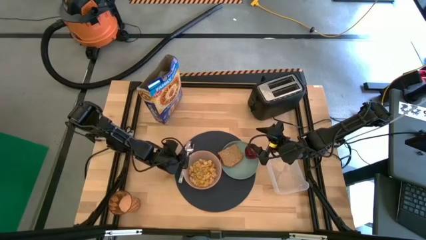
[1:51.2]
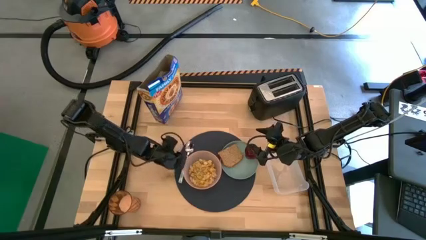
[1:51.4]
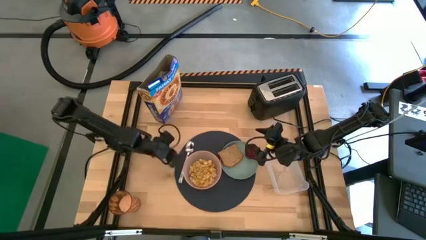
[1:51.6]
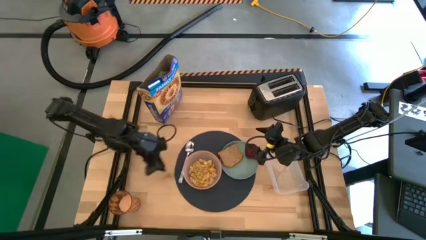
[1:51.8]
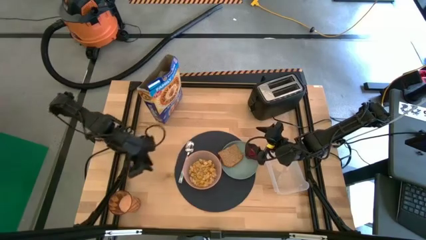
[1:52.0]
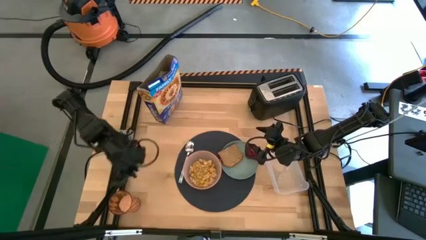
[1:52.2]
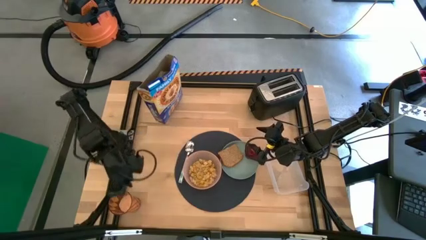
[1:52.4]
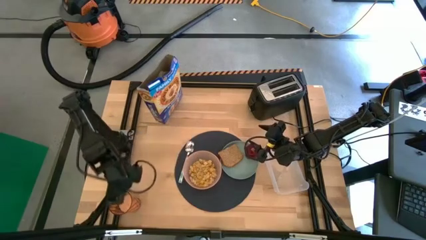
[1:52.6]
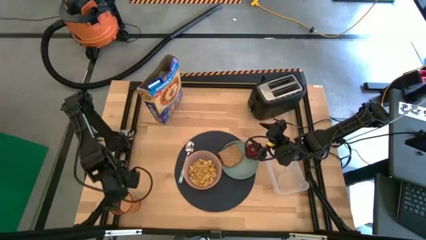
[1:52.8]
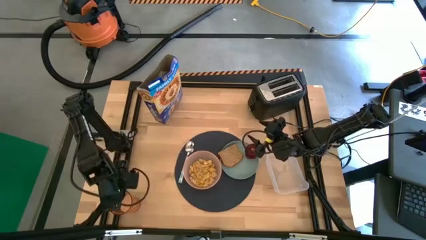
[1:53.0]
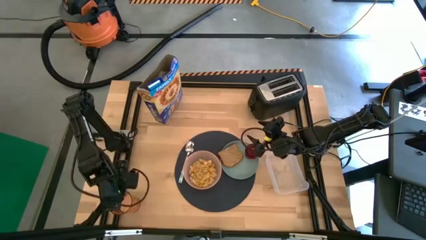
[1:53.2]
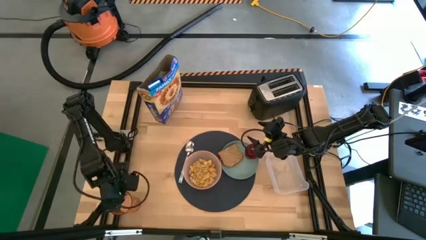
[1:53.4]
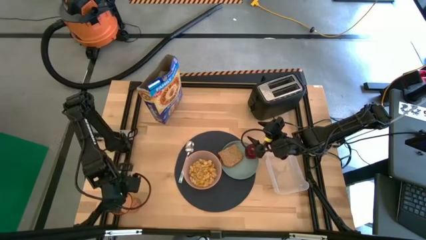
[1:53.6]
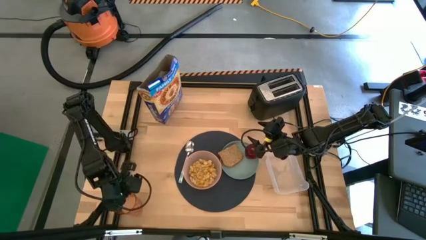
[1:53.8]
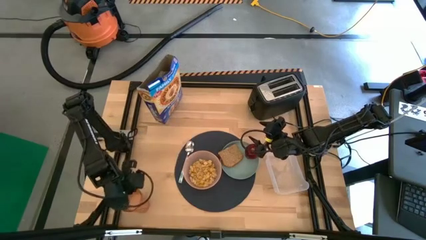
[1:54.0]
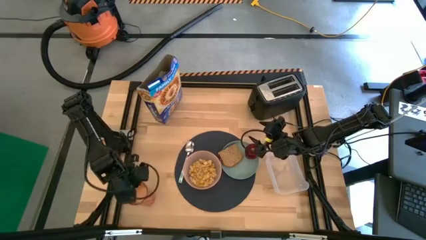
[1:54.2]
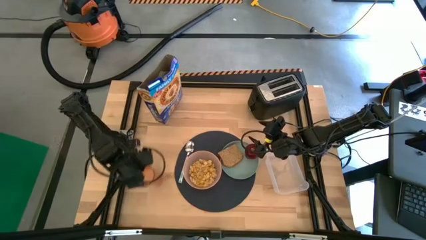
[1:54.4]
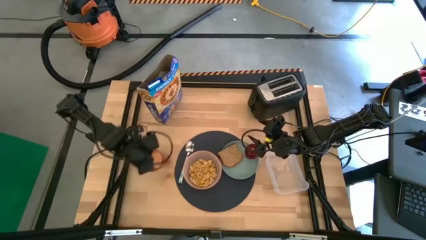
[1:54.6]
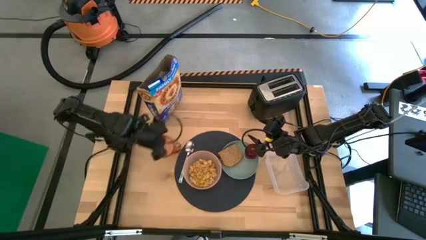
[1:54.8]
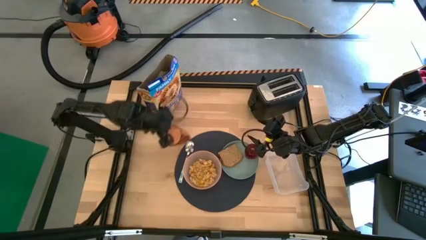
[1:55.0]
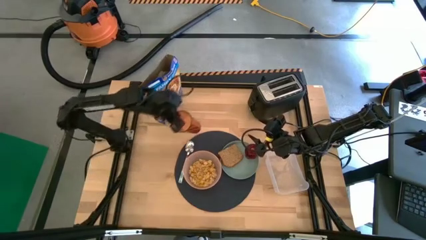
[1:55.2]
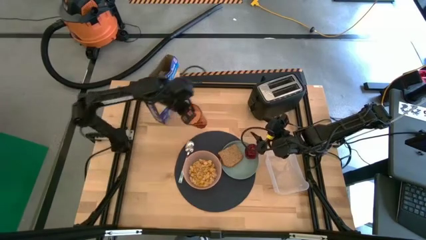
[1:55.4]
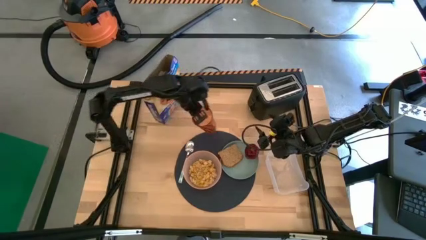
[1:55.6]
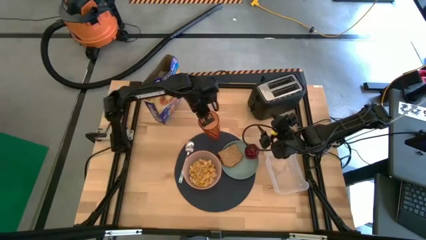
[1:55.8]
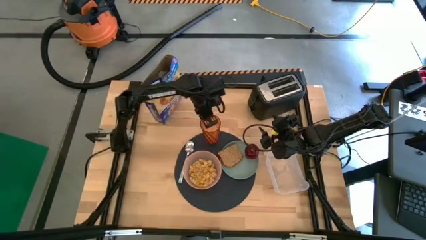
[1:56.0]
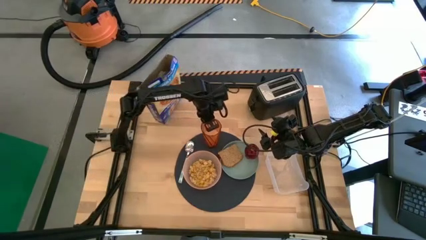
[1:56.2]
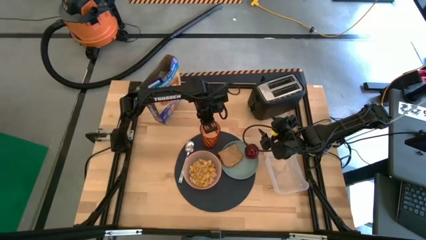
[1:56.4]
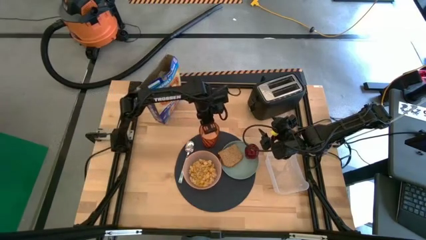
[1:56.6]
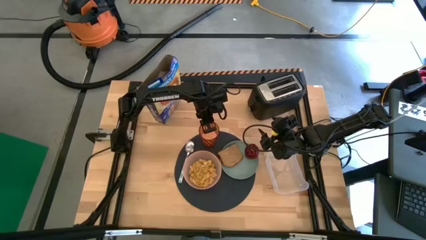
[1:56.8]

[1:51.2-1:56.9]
Task: Arrange a breakfast setting
Put the orange cup on the black placemat to the top of the pink bowl

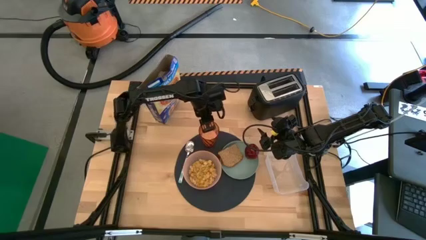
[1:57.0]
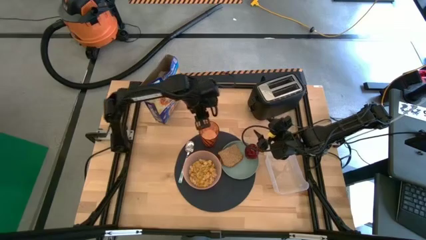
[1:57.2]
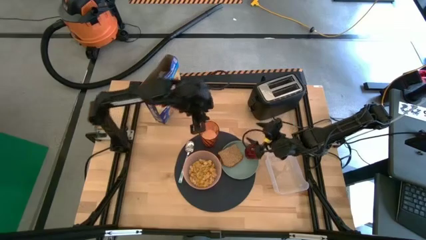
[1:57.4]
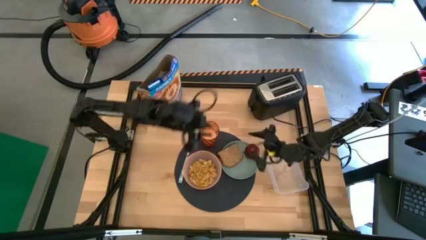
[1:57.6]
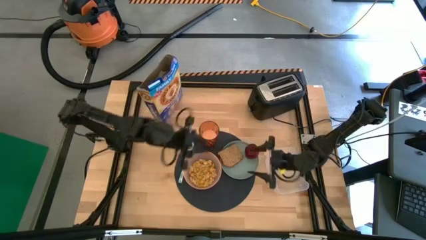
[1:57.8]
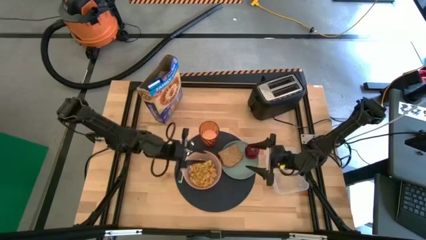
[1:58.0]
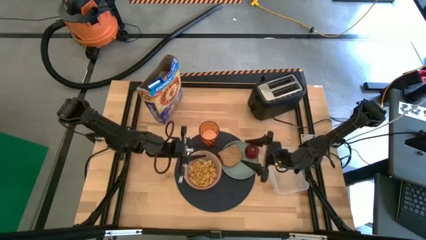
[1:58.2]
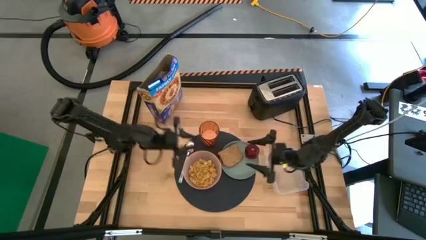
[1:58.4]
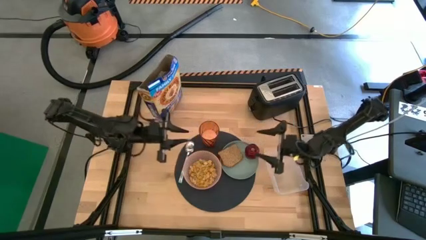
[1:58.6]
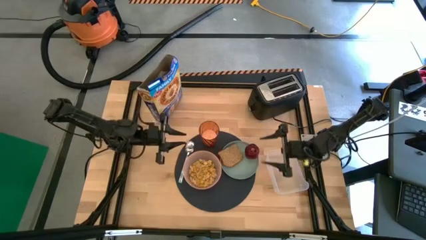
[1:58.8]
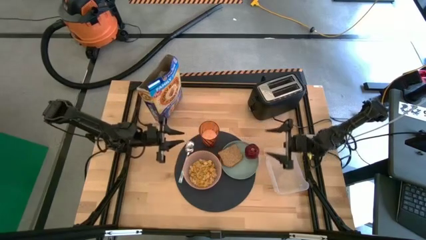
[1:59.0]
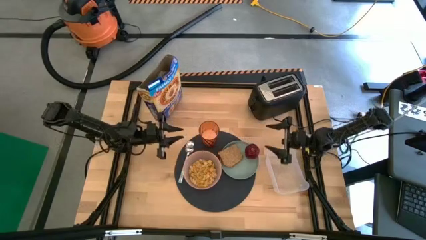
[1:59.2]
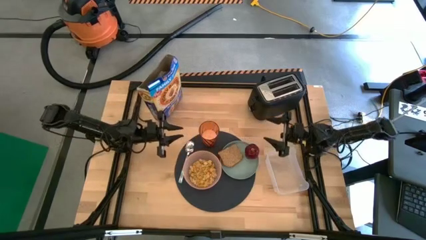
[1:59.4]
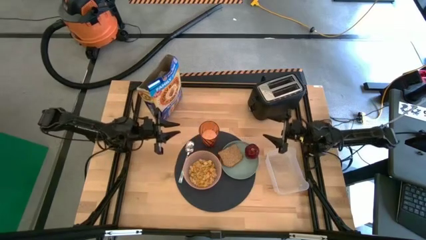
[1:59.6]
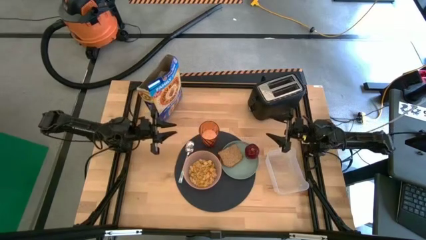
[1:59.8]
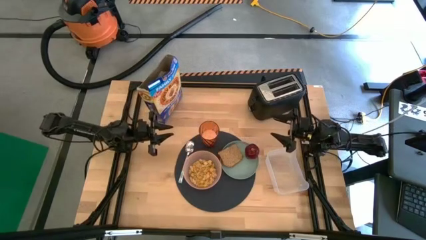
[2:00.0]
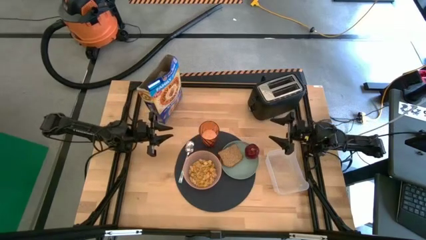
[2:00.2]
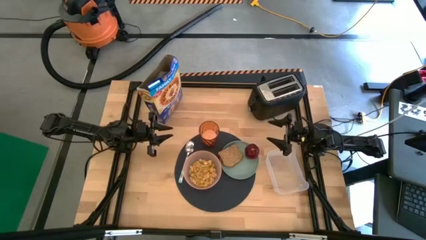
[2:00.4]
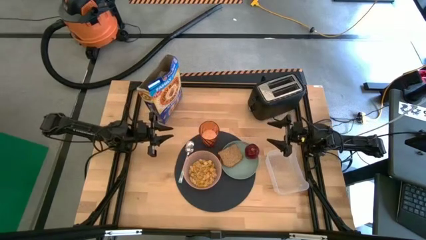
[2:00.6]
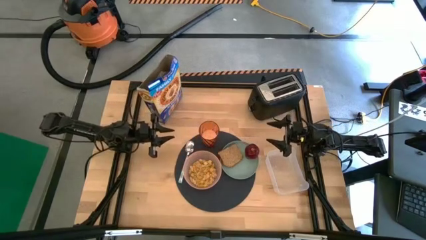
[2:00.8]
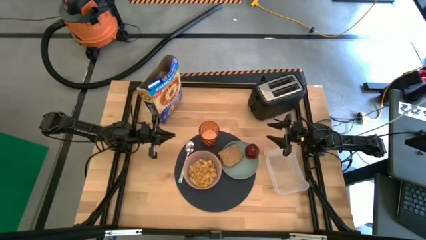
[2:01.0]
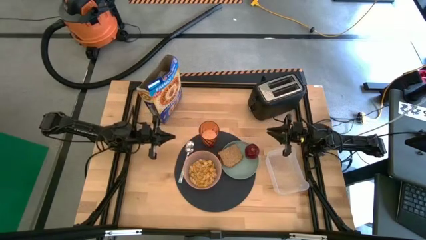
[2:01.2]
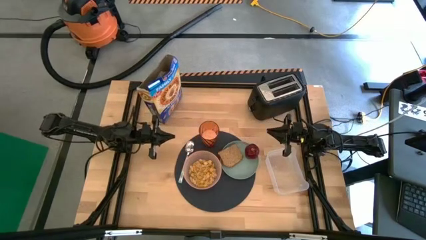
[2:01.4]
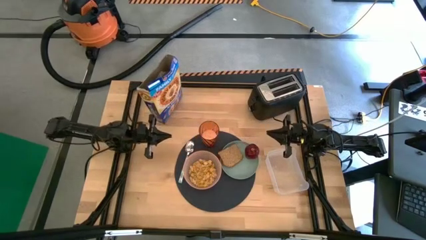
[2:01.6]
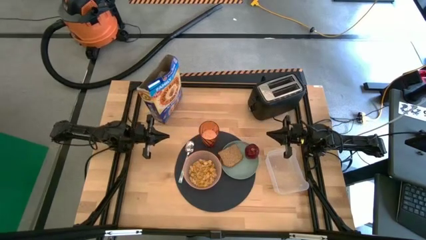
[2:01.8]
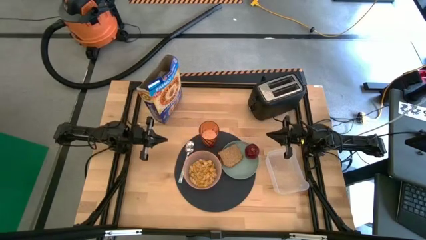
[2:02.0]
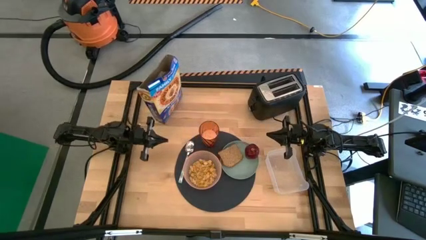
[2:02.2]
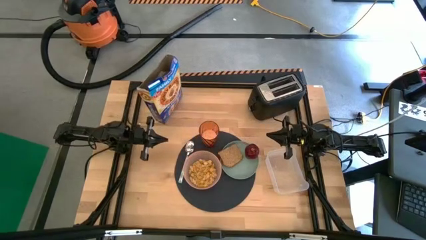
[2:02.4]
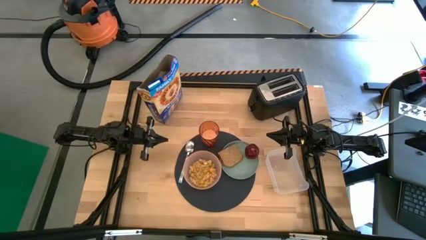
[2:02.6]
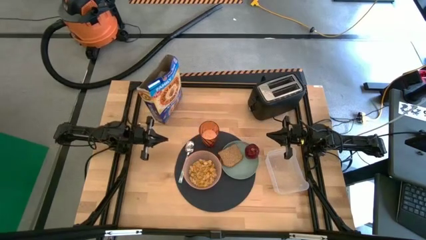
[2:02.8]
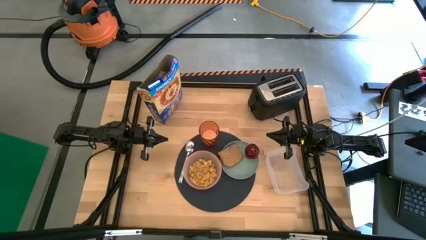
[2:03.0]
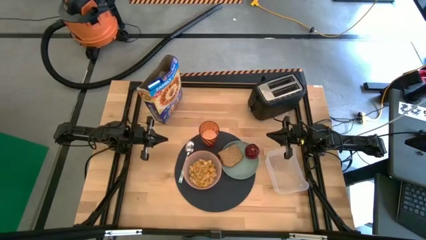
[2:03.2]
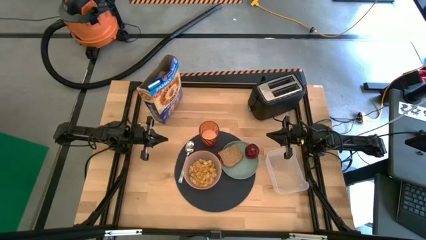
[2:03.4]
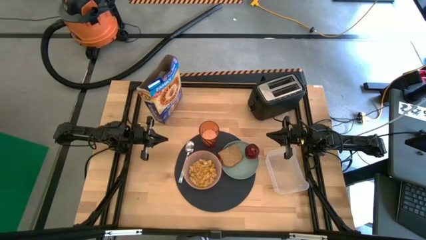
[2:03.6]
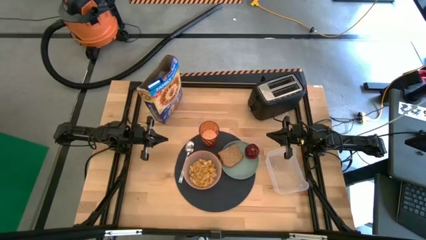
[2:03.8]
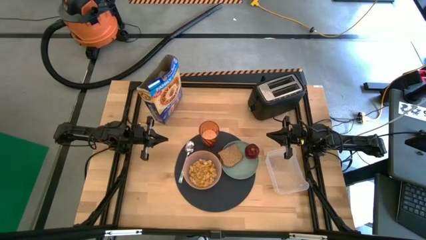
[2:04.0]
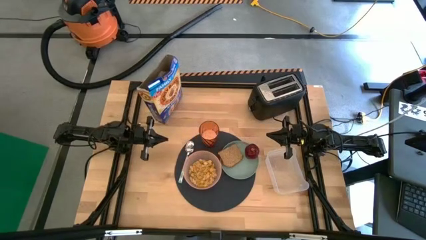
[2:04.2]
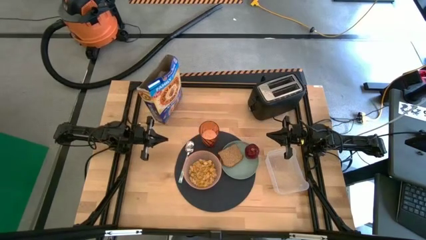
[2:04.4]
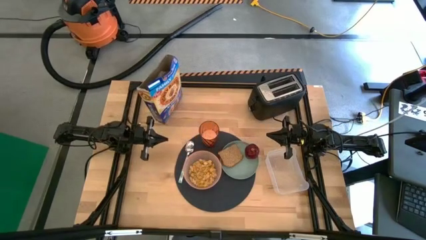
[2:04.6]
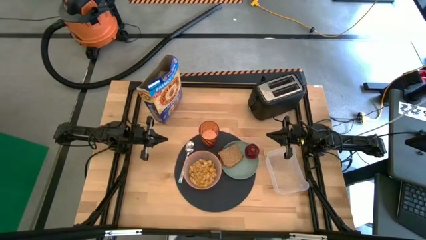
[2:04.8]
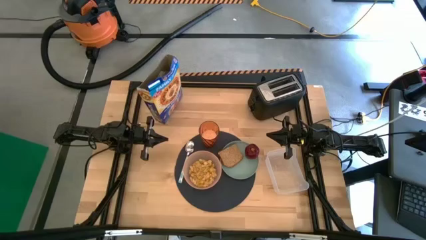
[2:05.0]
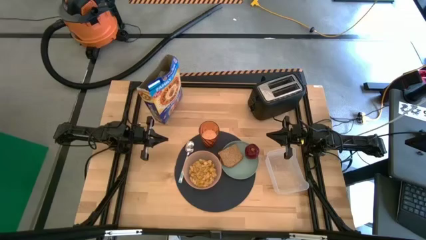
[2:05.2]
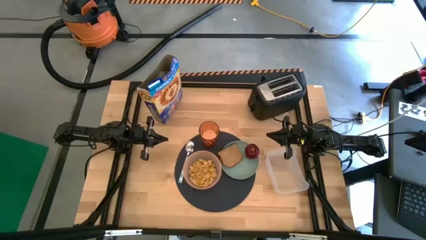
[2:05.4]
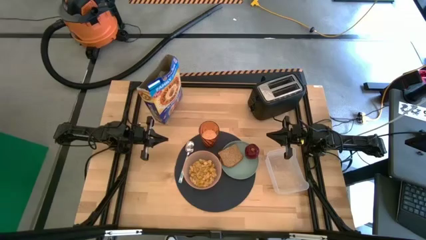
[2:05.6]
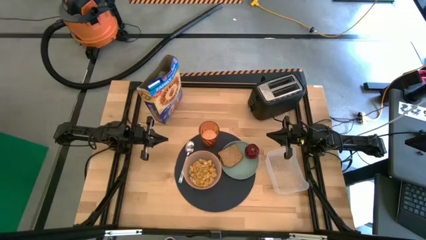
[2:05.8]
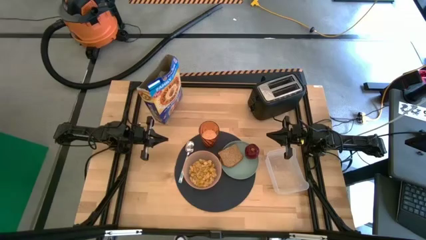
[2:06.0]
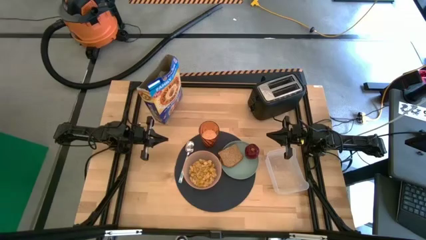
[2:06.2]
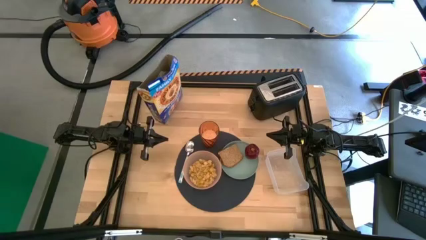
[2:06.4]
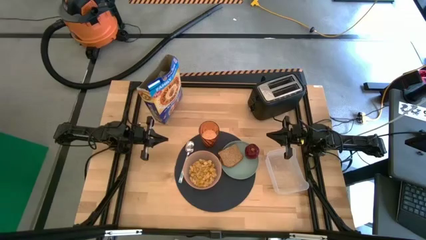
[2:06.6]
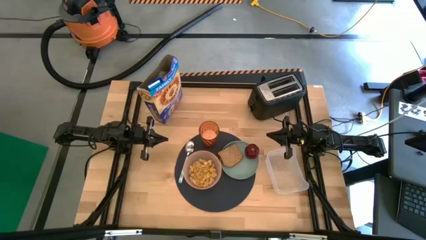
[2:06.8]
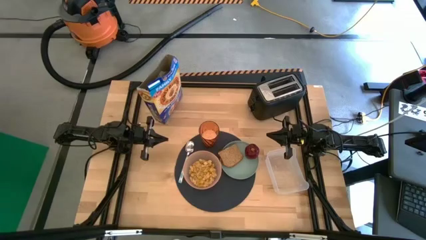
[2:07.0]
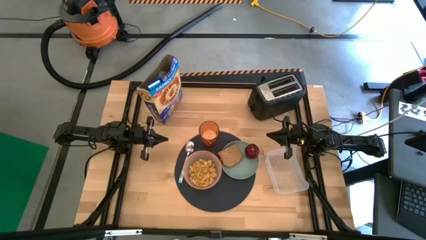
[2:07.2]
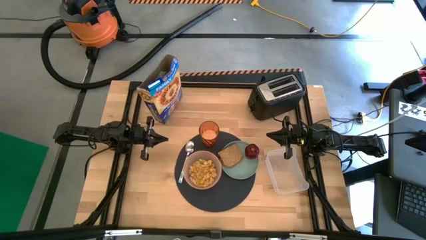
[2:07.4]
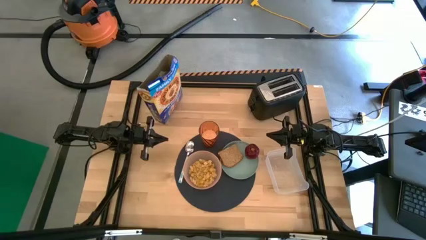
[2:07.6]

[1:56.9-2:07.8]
Return To Home Position
